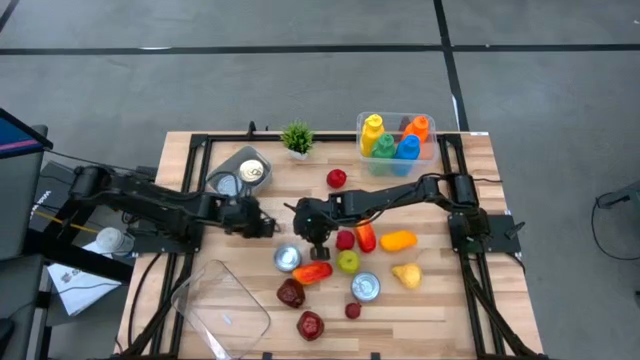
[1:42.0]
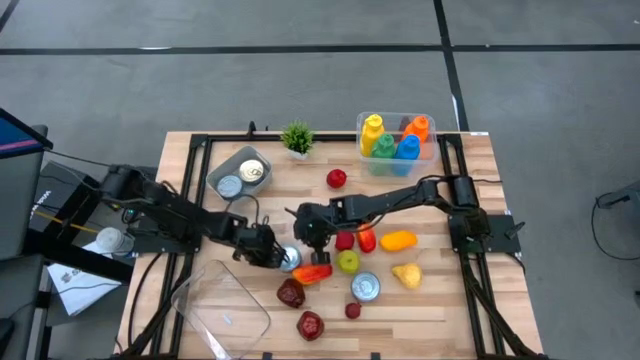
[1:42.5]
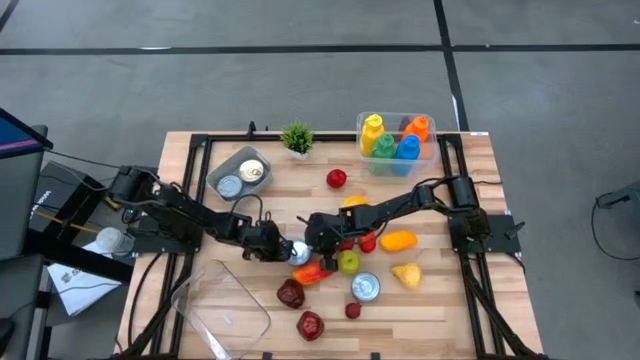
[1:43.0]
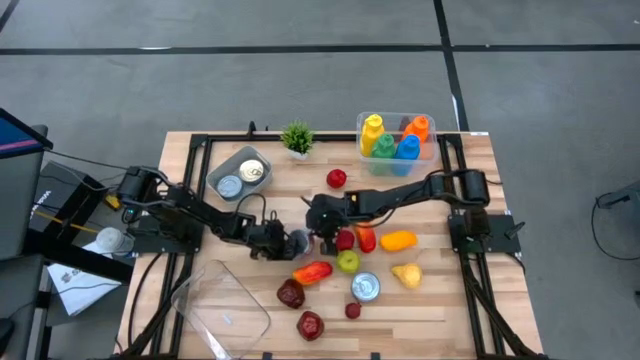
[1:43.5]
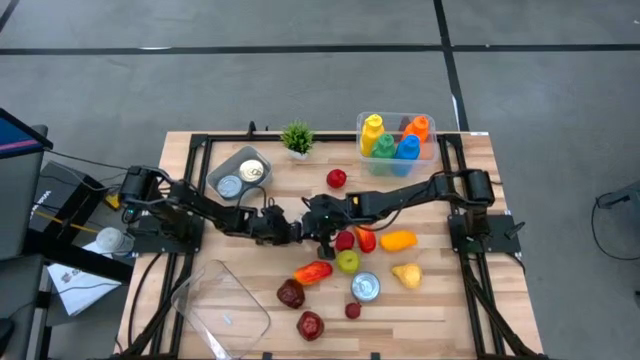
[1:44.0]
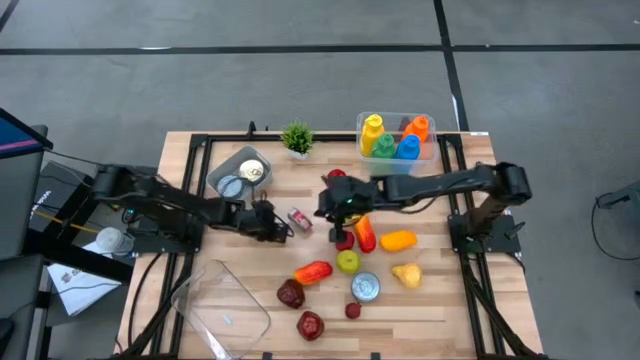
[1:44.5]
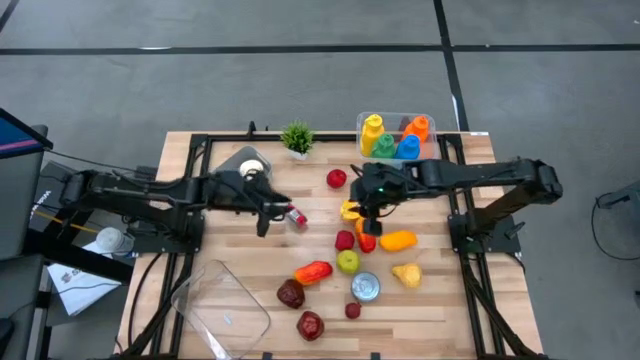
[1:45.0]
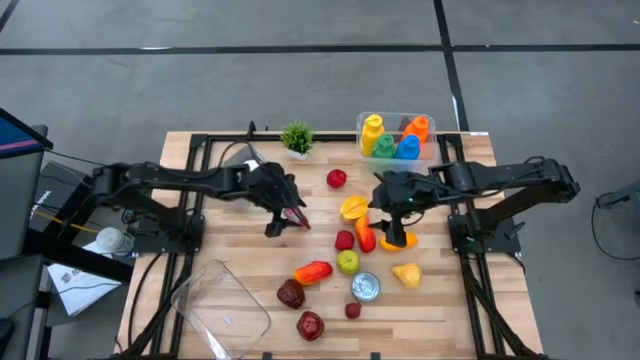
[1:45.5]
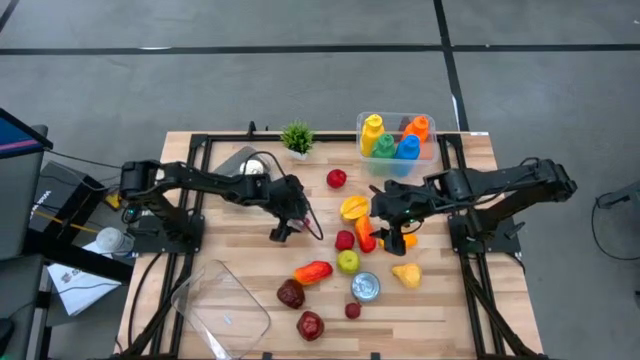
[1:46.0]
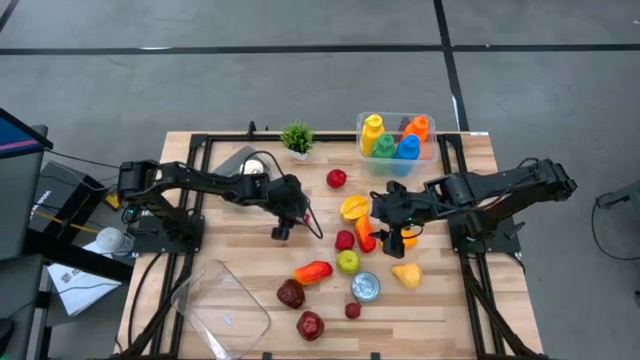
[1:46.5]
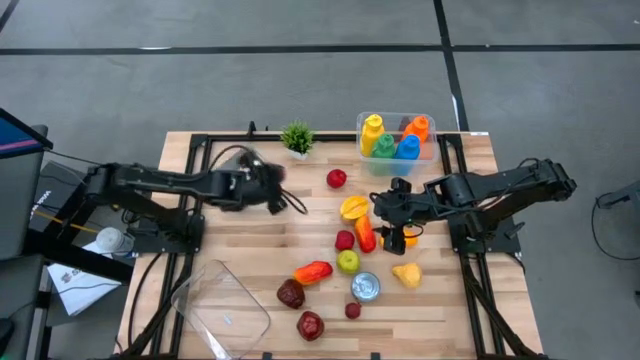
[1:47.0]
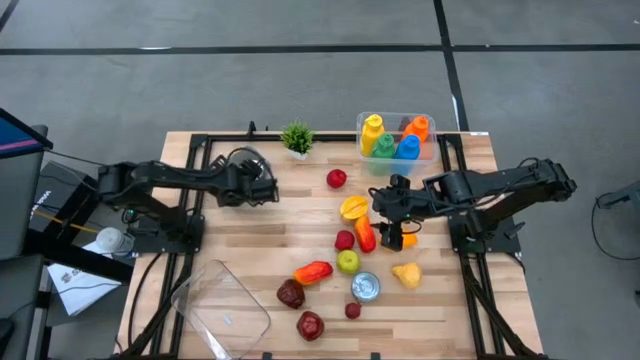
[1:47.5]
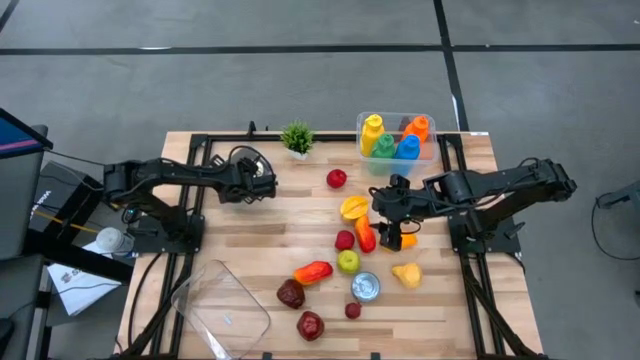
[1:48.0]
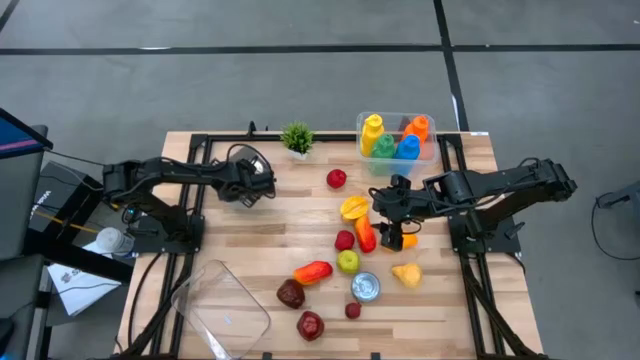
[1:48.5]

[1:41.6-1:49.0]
Task: Pick & Place Food Item
Put the red tuna can into the gray bin

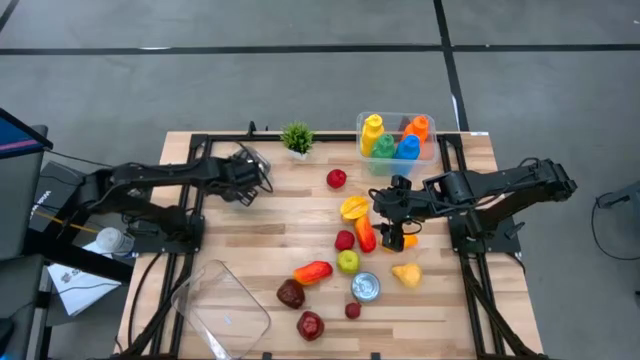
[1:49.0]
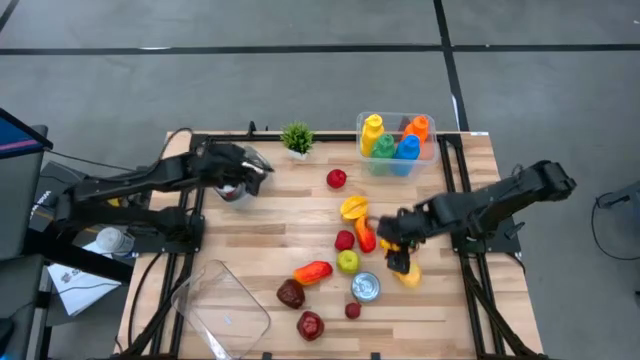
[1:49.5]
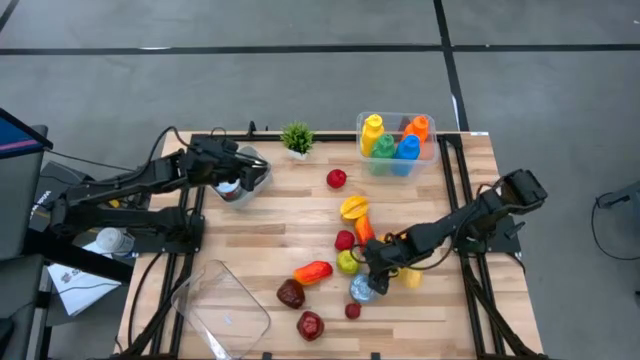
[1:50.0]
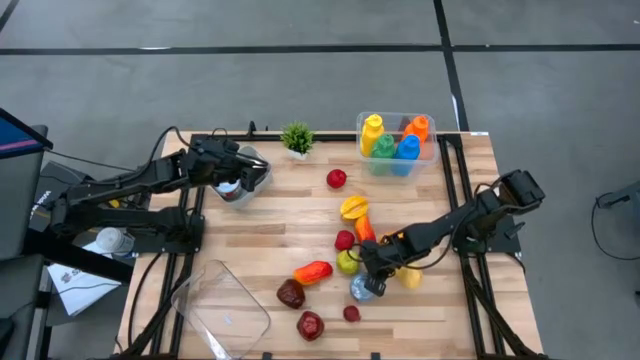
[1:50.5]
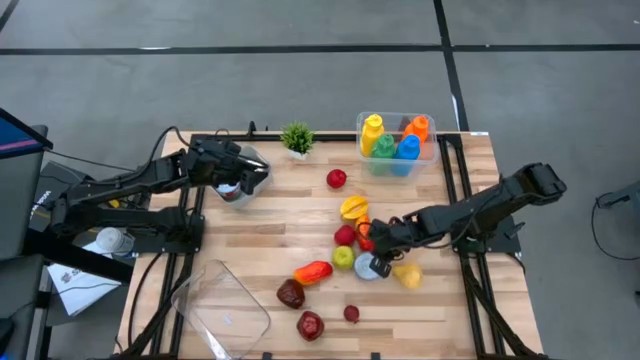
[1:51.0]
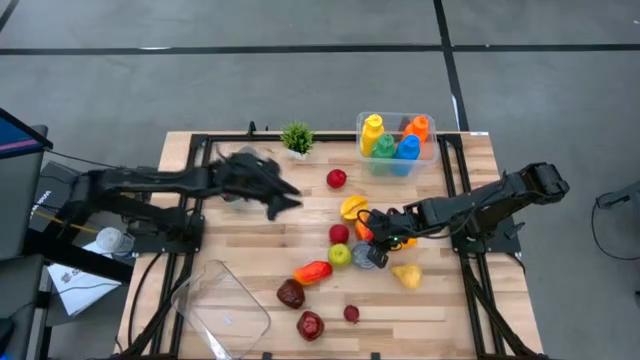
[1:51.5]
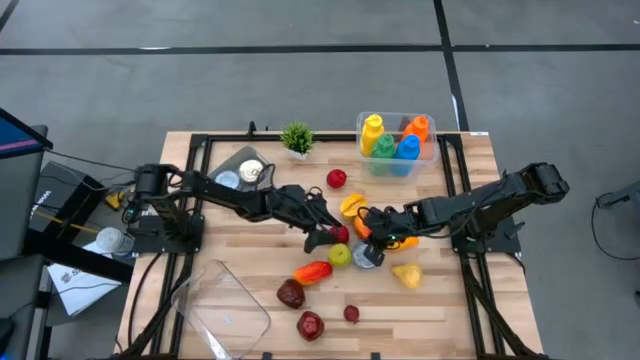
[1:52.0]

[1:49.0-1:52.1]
Put the blue tuna can into the gray bin

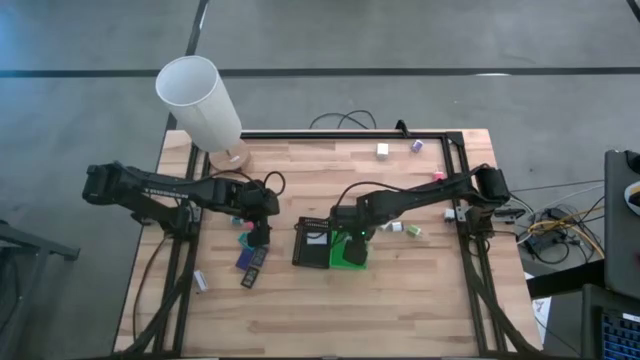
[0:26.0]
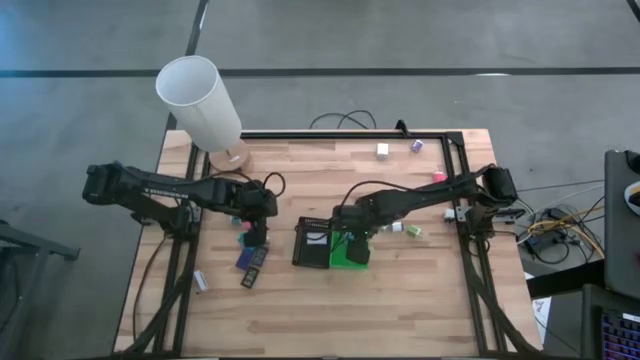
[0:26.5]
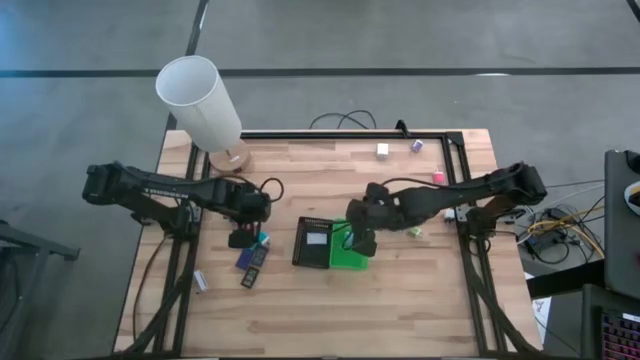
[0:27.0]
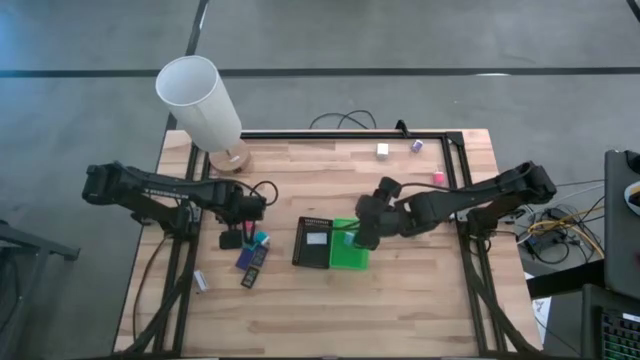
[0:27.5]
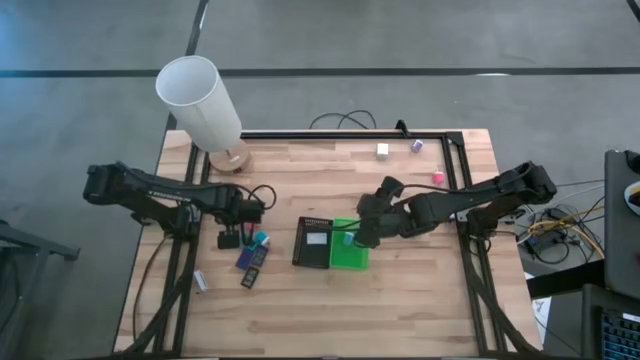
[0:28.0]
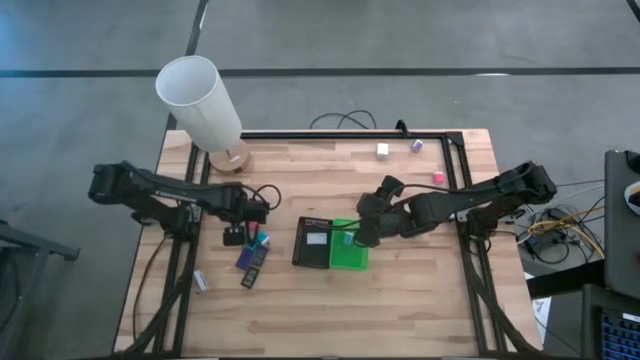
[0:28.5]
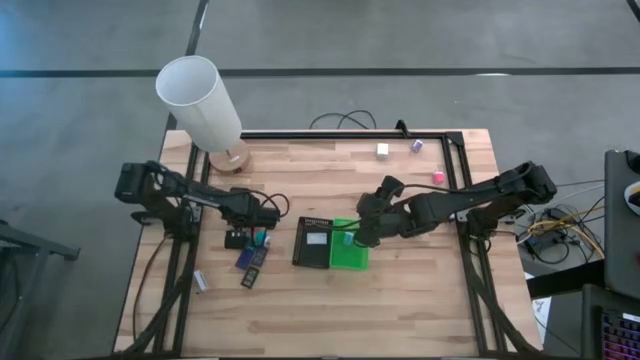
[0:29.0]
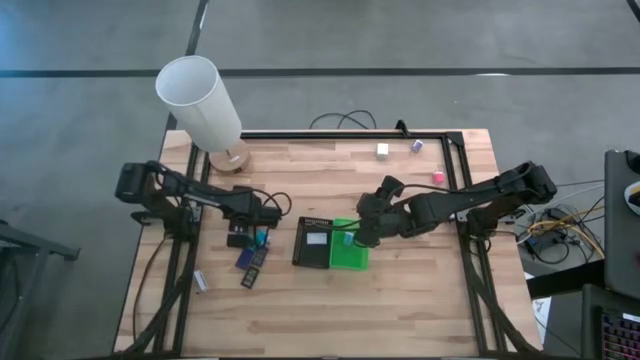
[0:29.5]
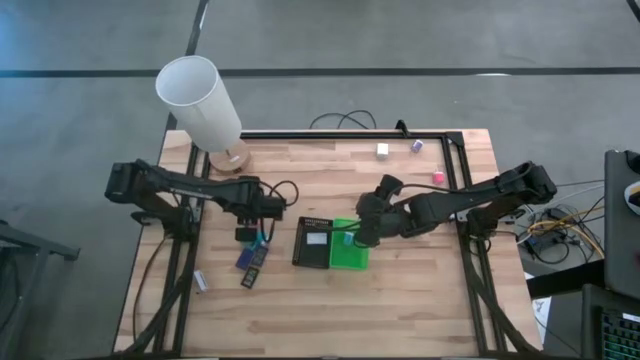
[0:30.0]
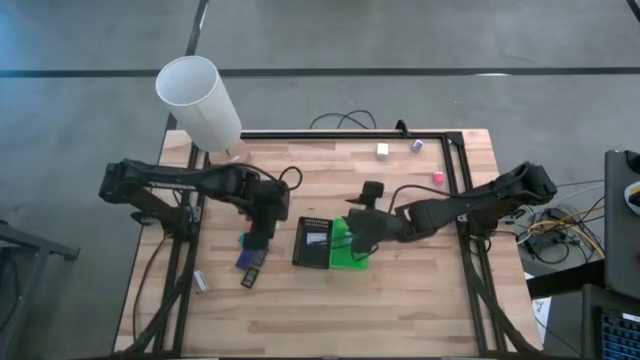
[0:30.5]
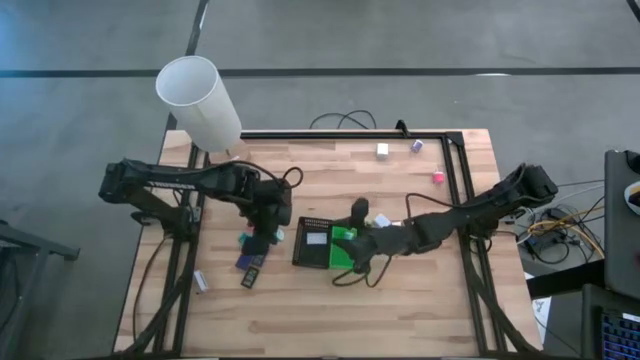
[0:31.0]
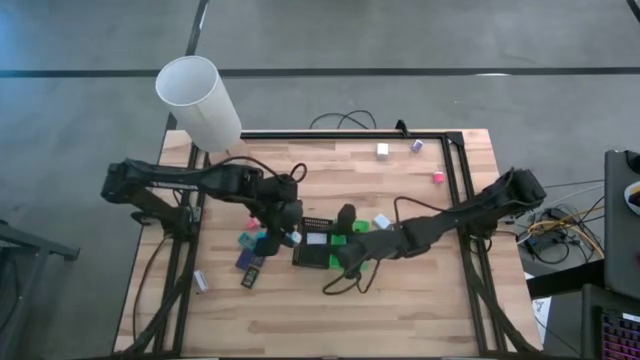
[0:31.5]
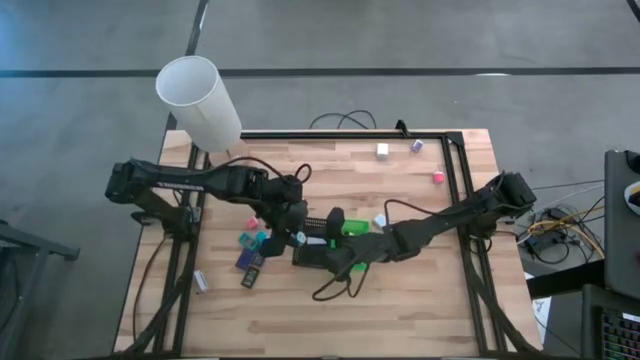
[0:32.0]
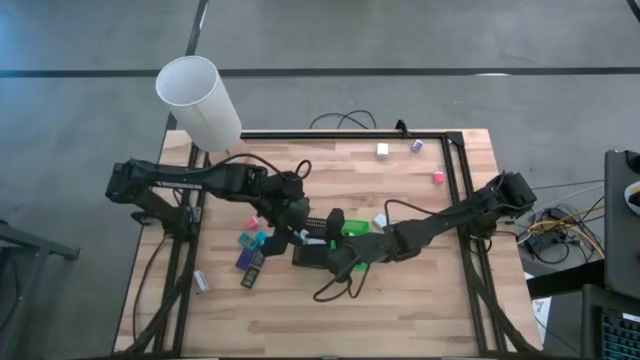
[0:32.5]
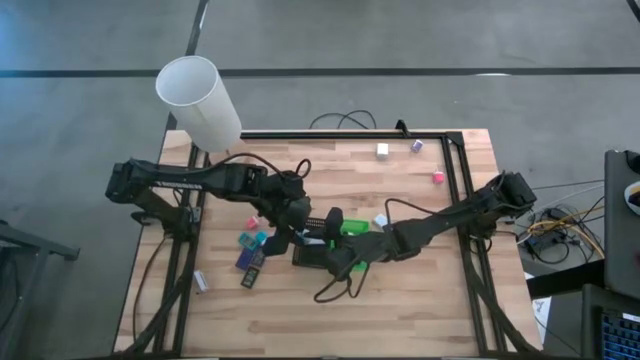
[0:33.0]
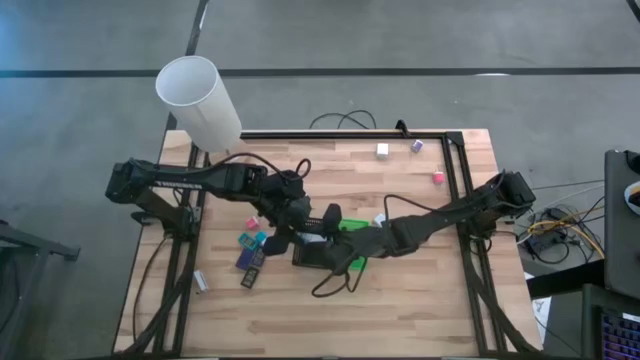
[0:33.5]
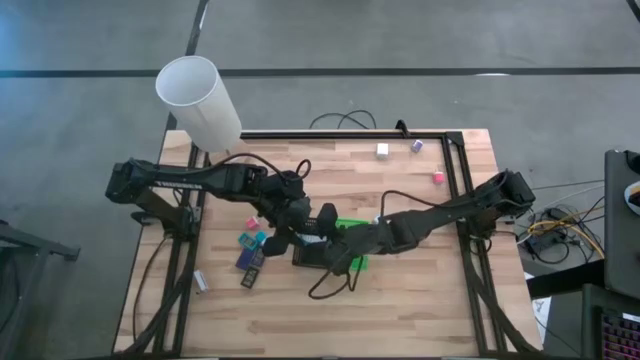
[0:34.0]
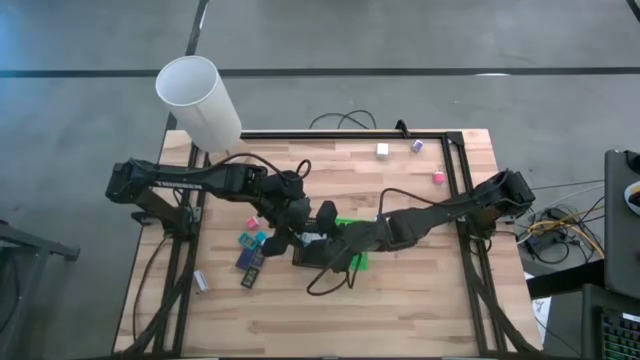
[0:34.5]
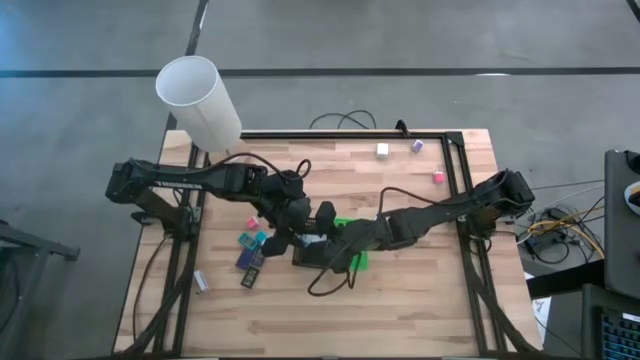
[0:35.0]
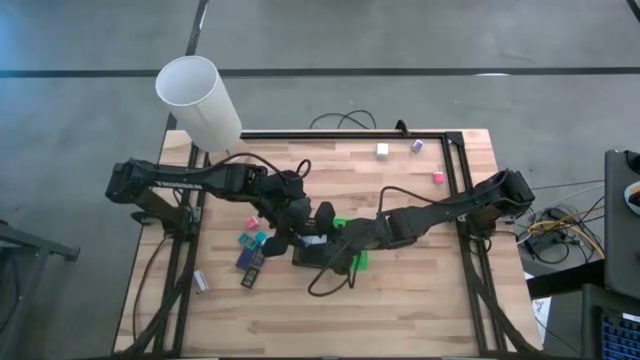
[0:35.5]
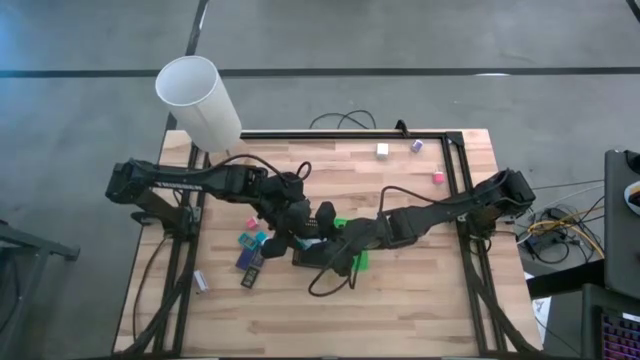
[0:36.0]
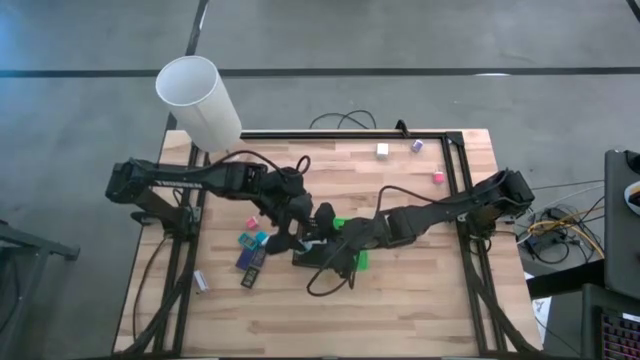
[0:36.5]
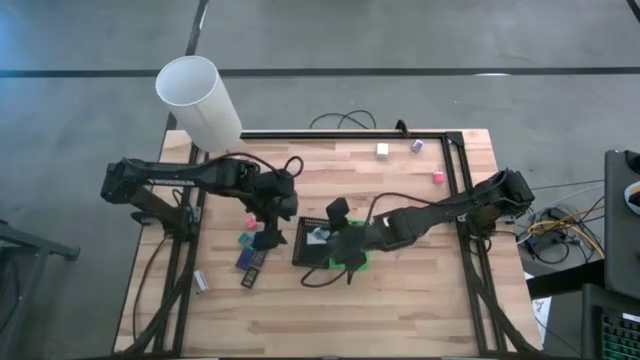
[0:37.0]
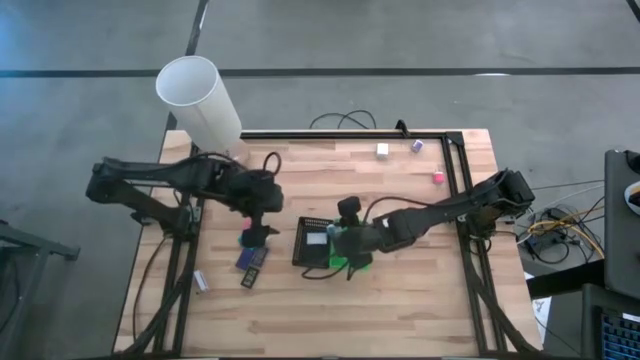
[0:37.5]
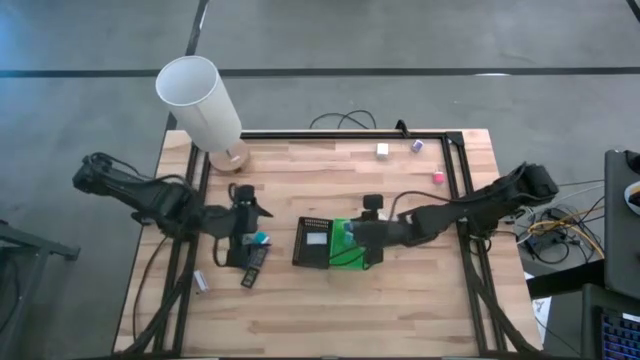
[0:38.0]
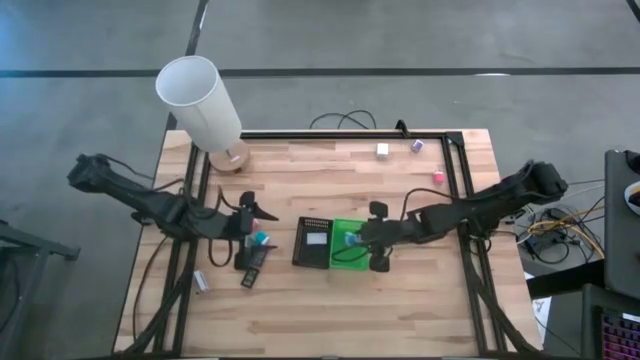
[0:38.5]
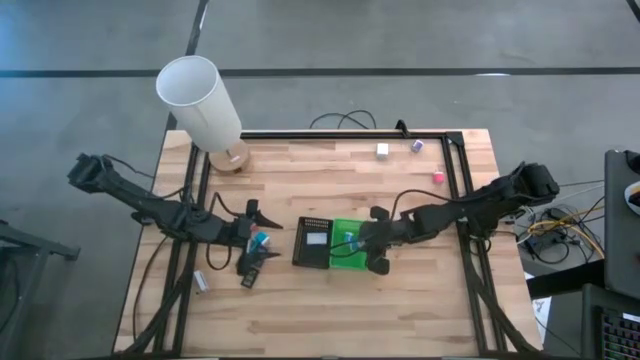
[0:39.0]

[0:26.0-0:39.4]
Task: Pick & Place Office items
Put the left blue charger adapter into the green basket
